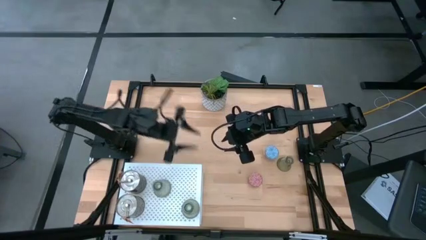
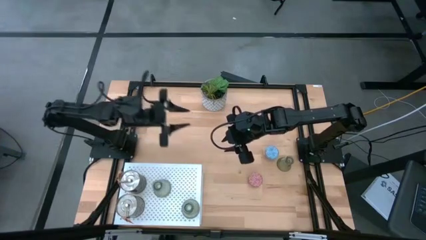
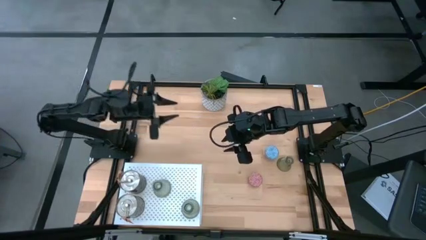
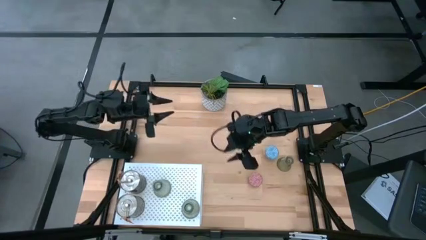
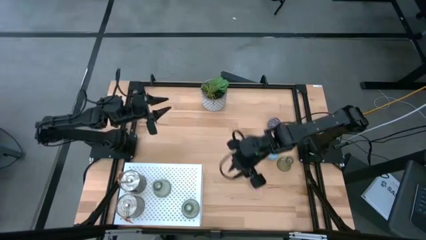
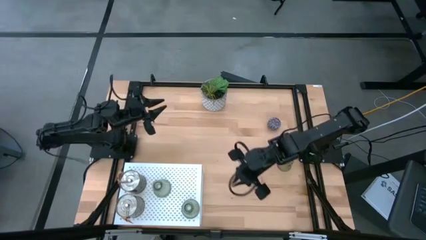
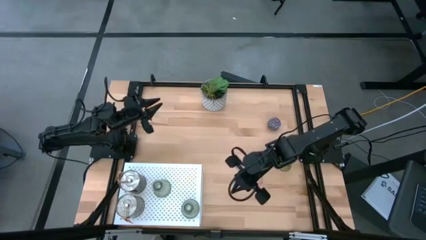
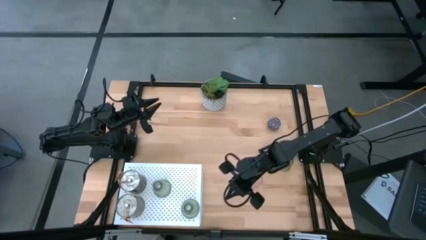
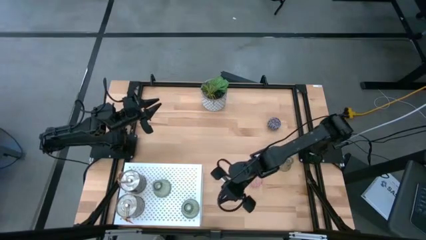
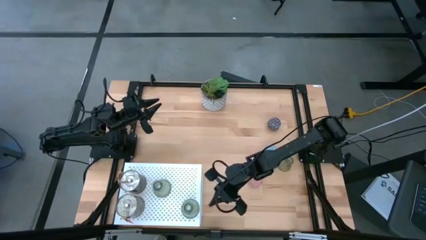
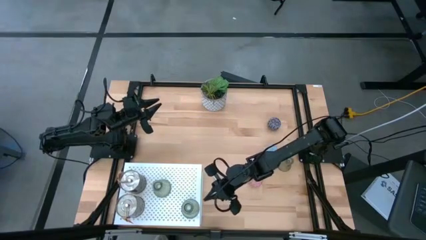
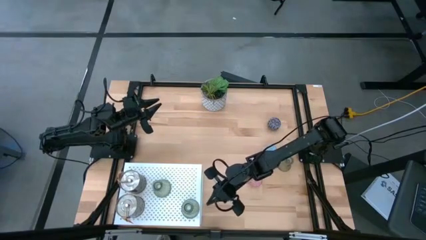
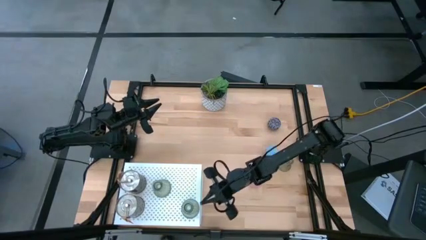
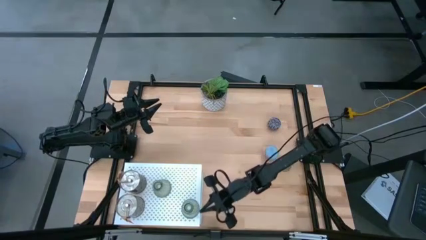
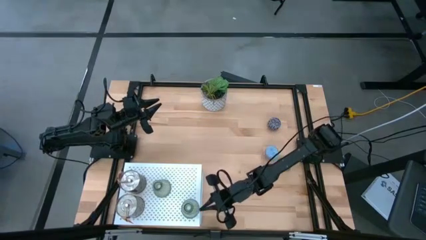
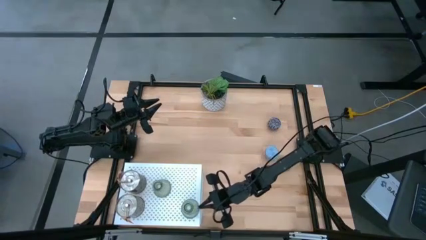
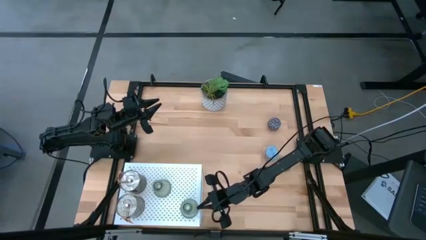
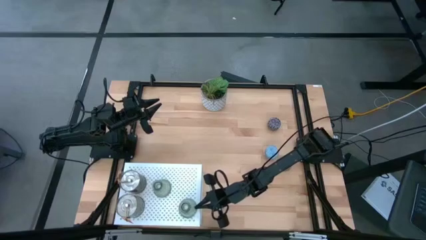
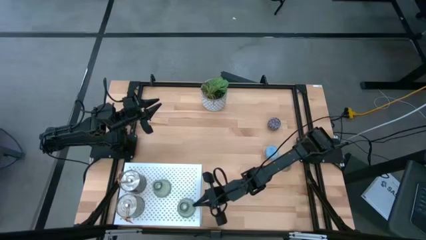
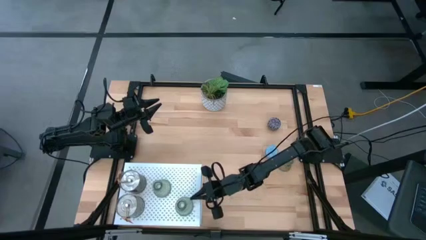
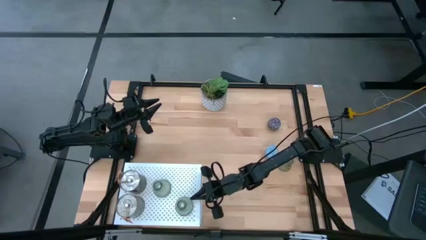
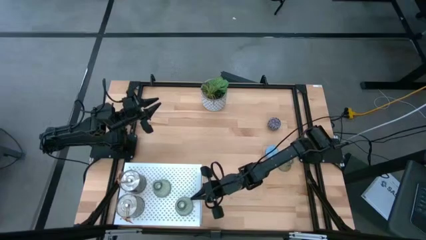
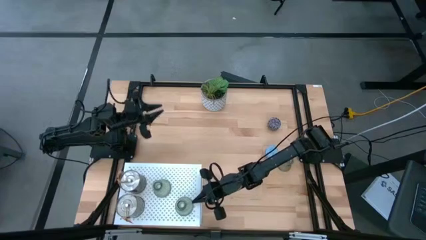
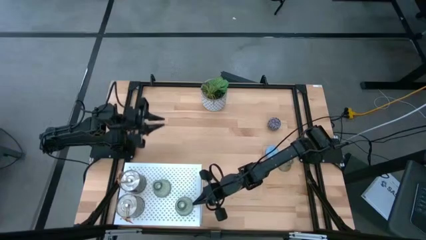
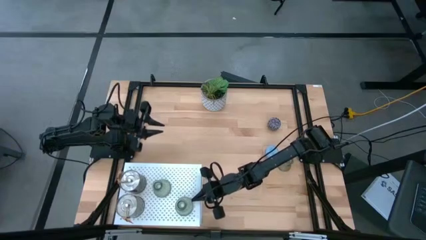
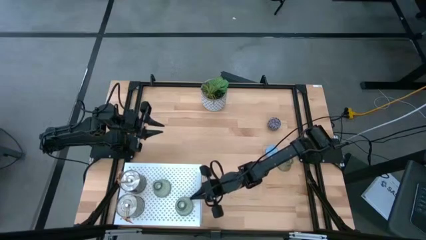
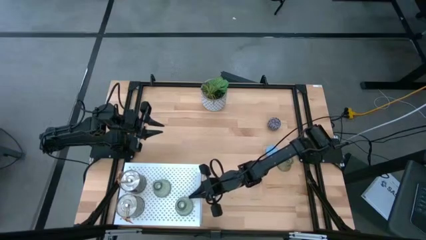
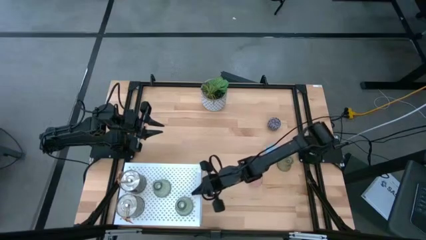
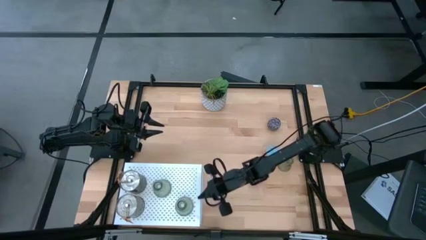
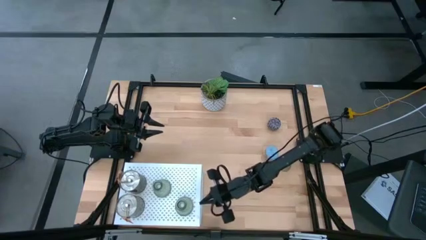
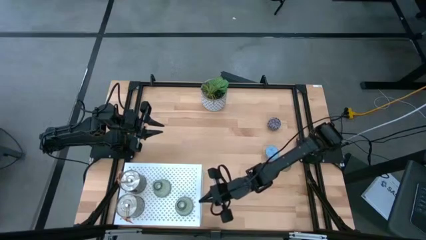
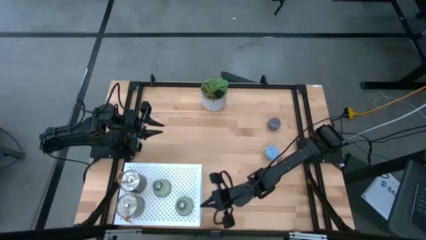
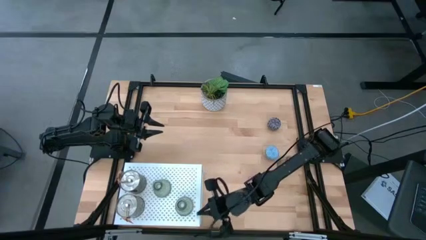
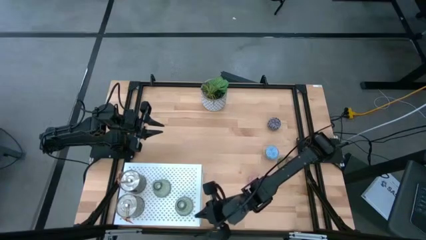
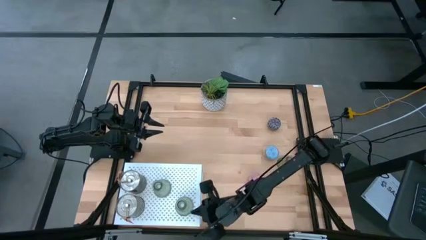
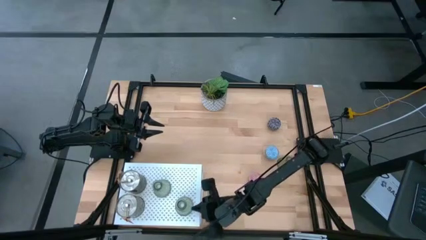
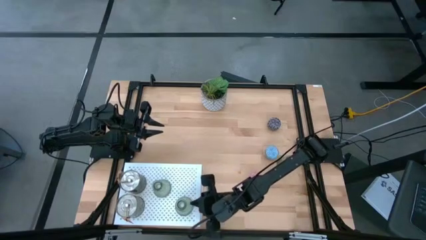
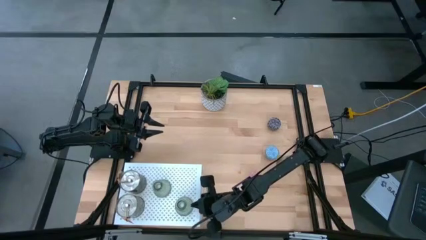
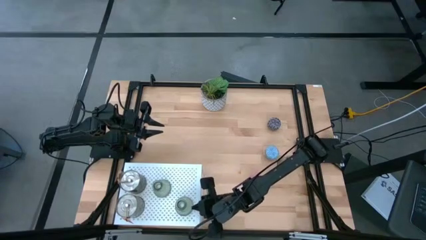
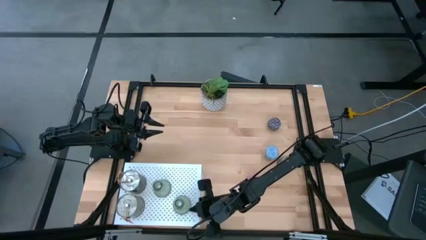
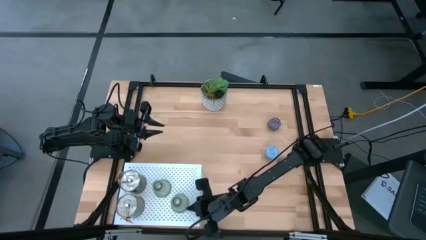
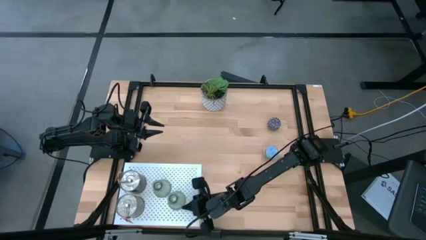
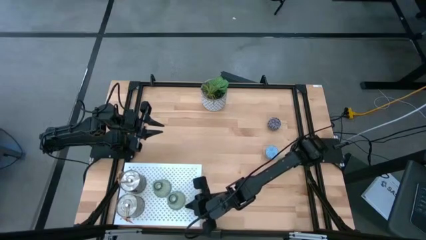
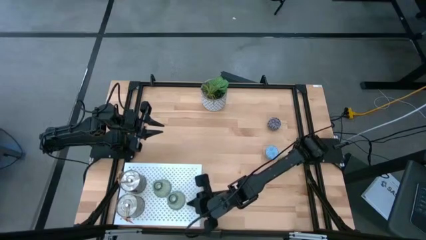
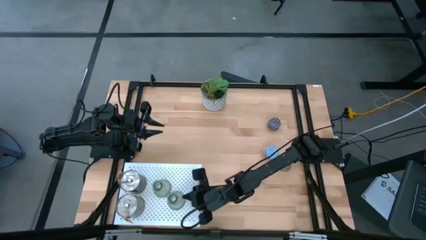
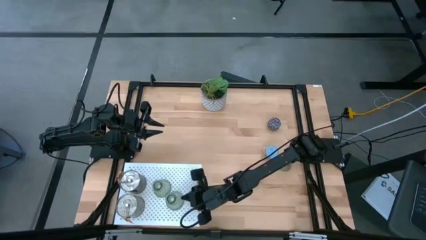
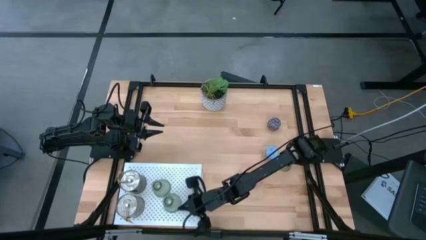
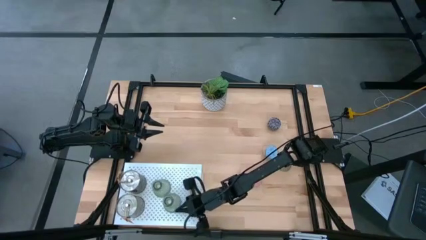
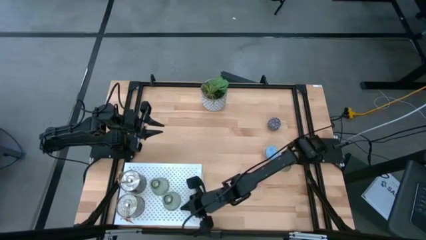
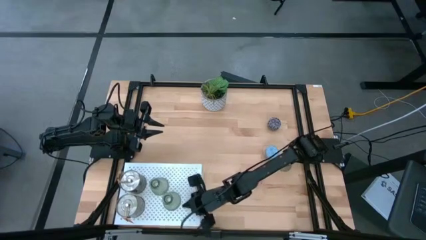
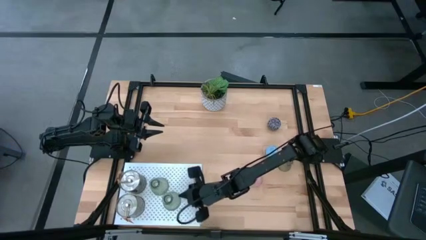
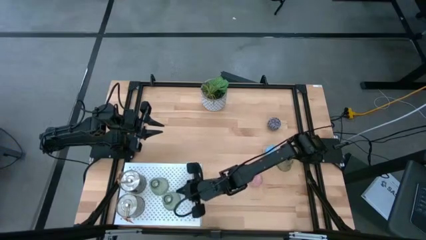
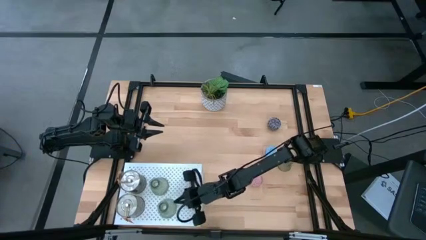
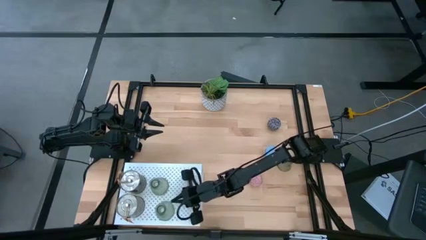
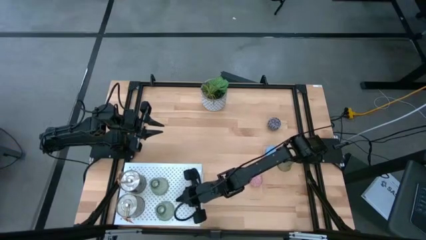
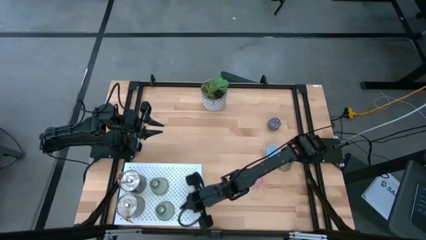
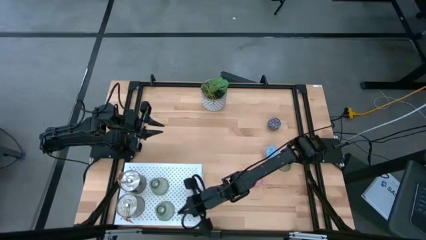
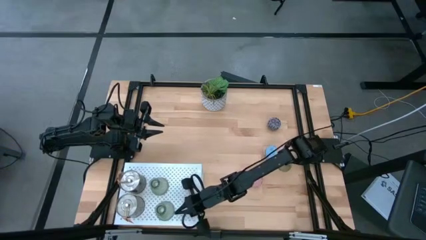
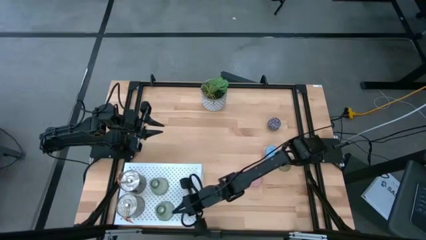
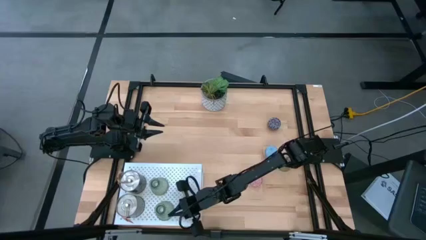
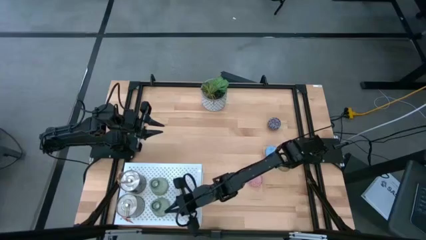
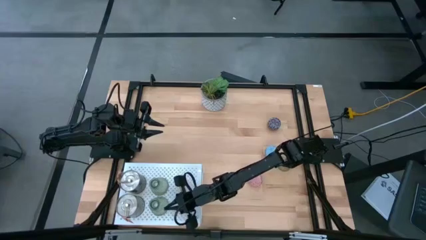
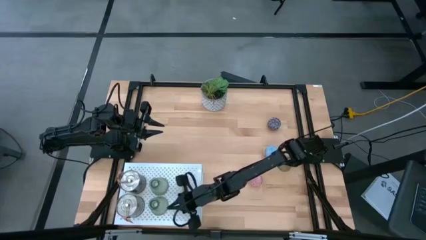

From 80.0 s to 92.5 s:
Task: Pick & Place candle stick holders
Put the top transparent candle holder on the shelf

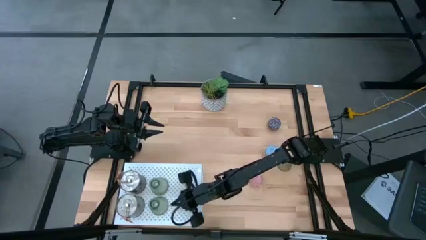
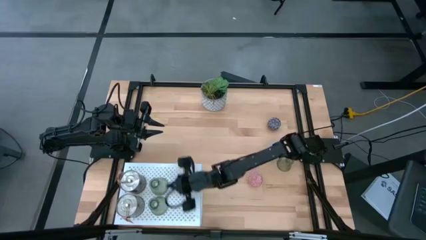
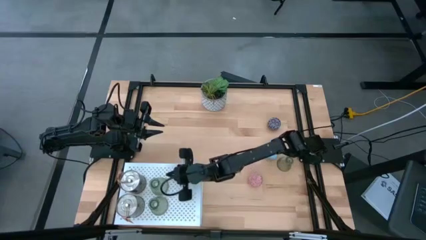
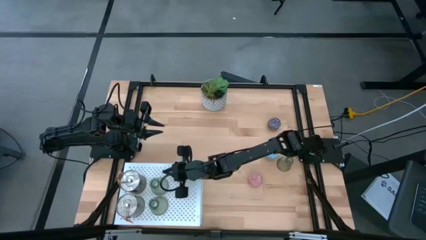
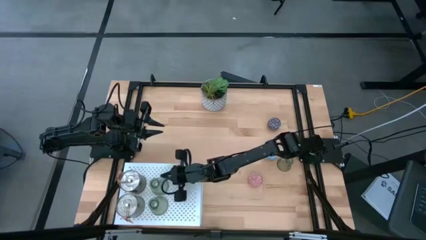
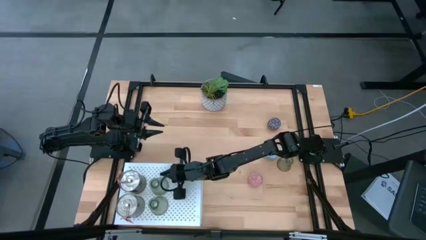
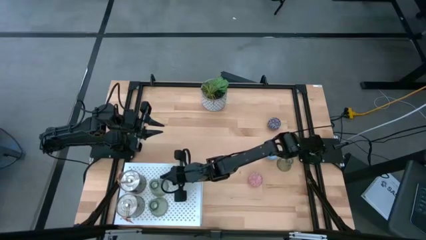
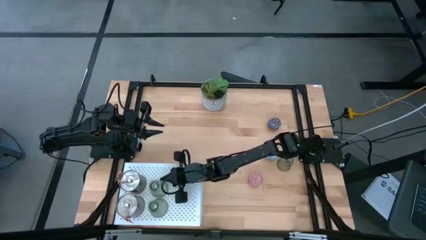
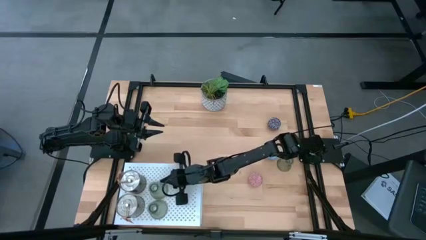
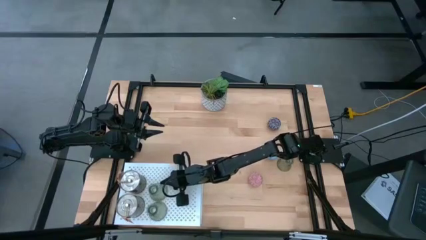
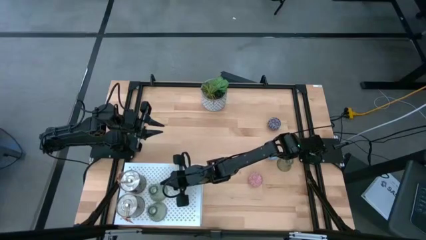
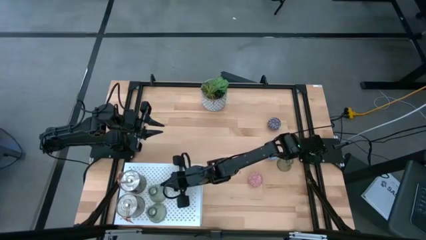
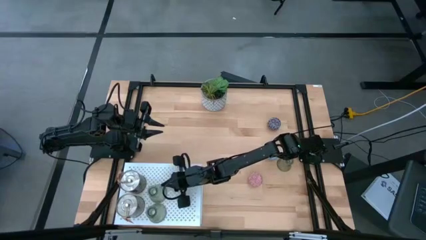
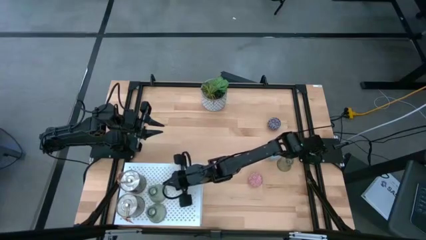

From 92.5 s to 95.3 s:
Adjust the transparent candle holder on the shelf
